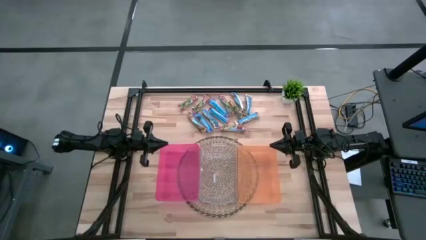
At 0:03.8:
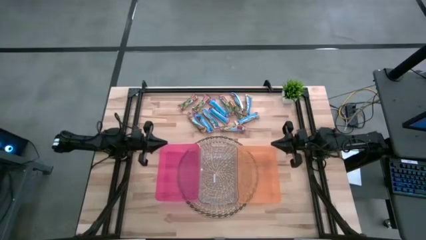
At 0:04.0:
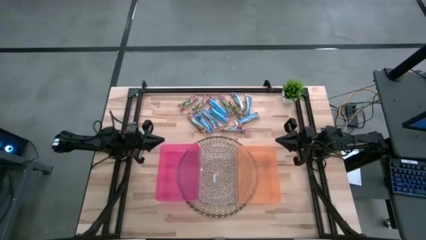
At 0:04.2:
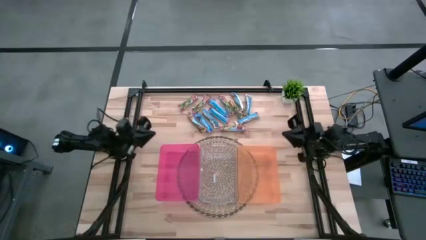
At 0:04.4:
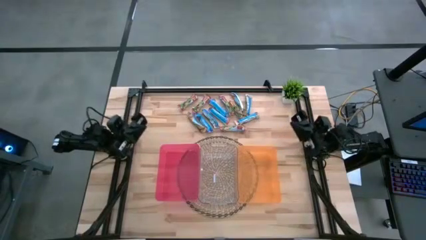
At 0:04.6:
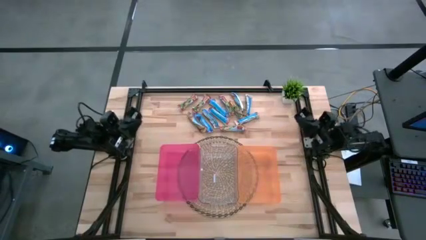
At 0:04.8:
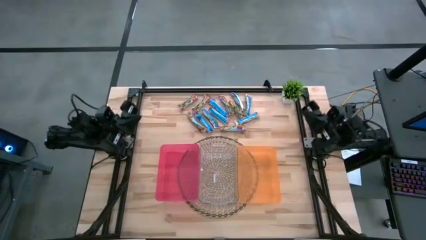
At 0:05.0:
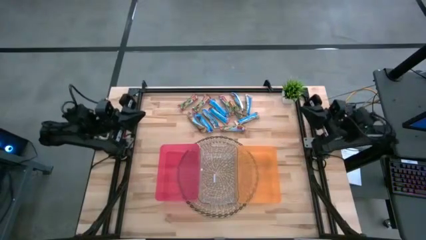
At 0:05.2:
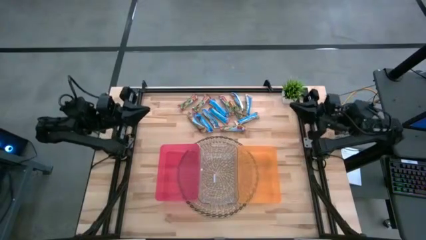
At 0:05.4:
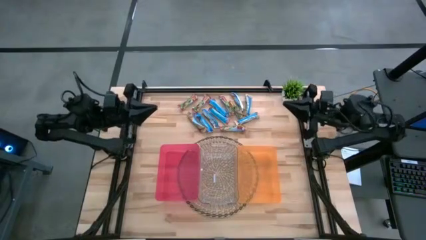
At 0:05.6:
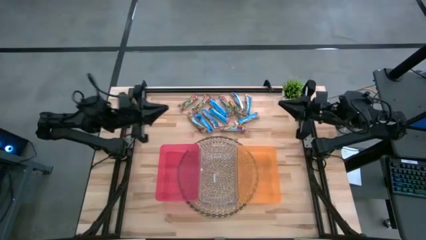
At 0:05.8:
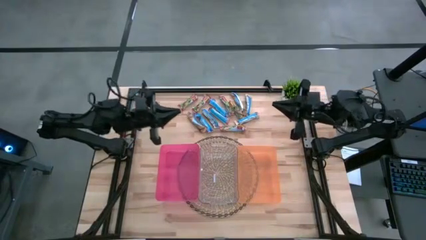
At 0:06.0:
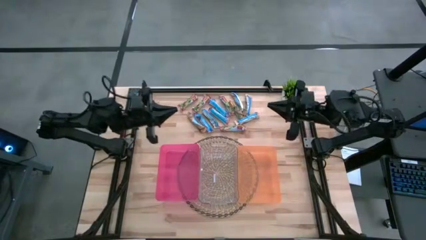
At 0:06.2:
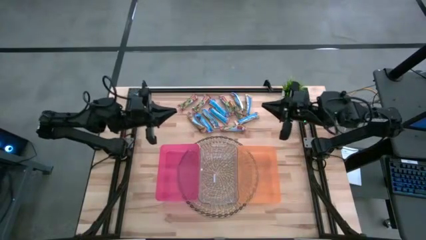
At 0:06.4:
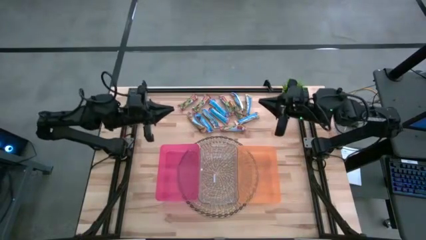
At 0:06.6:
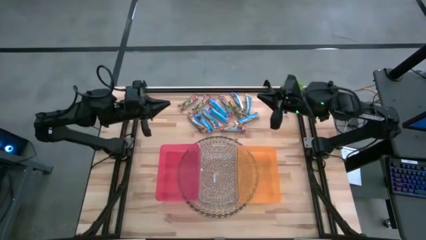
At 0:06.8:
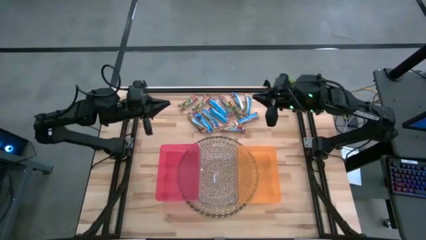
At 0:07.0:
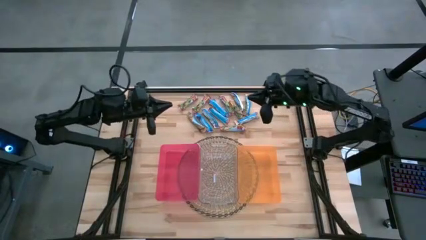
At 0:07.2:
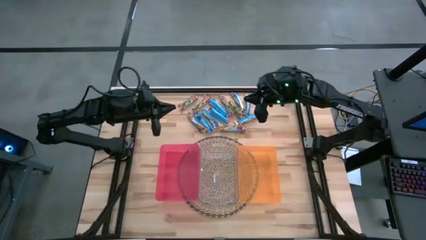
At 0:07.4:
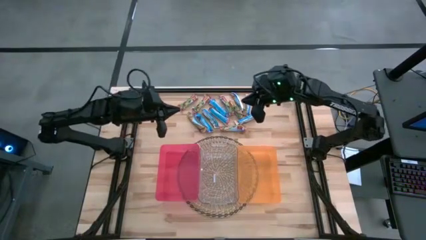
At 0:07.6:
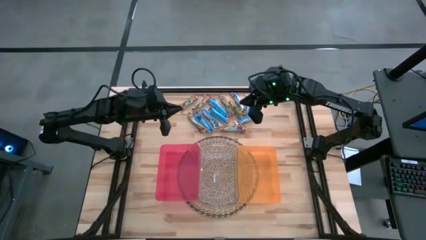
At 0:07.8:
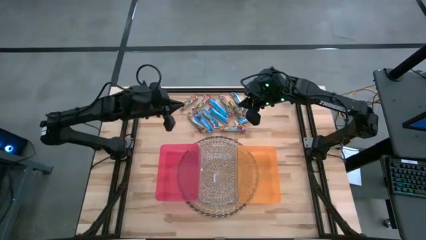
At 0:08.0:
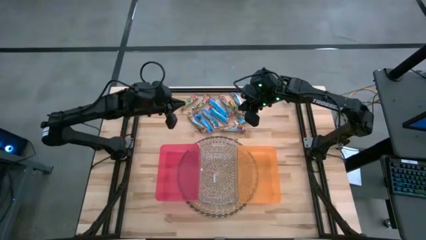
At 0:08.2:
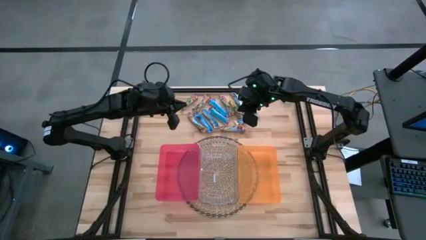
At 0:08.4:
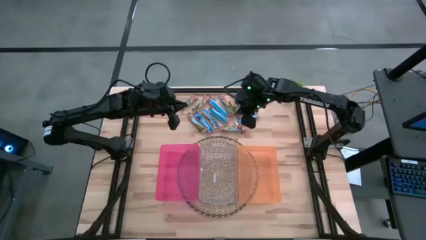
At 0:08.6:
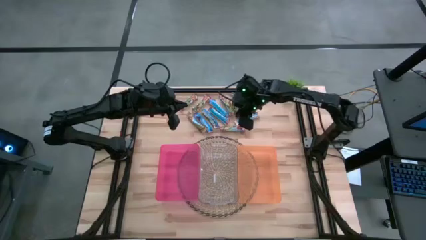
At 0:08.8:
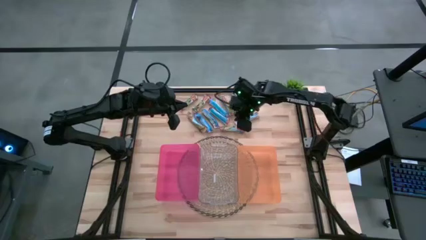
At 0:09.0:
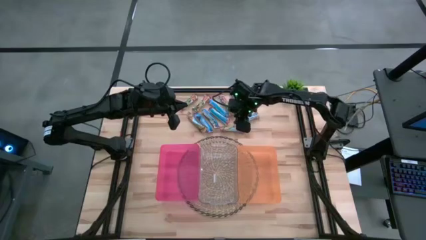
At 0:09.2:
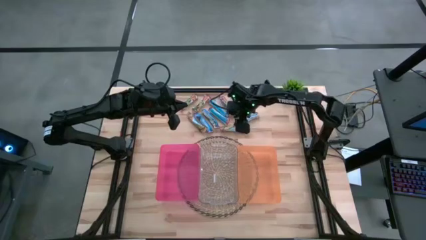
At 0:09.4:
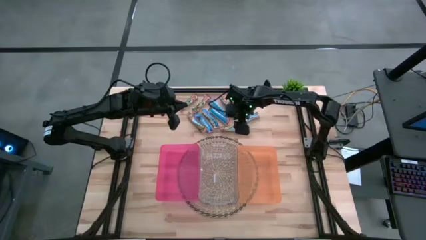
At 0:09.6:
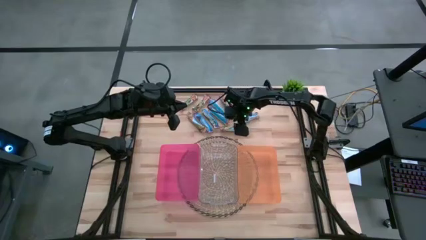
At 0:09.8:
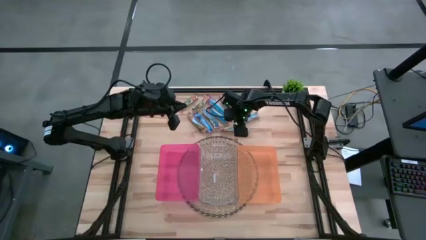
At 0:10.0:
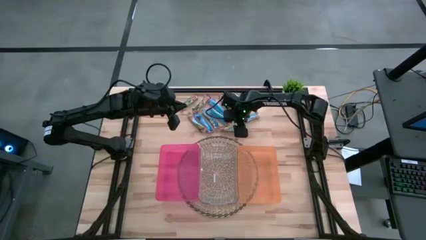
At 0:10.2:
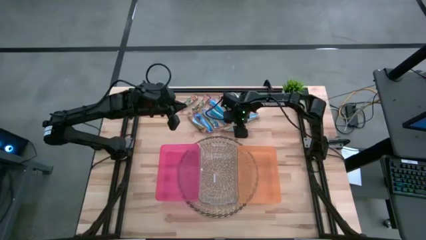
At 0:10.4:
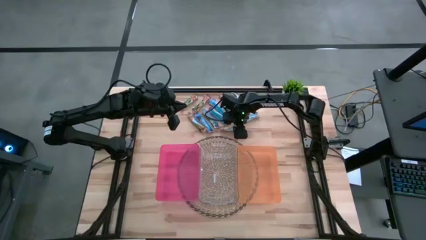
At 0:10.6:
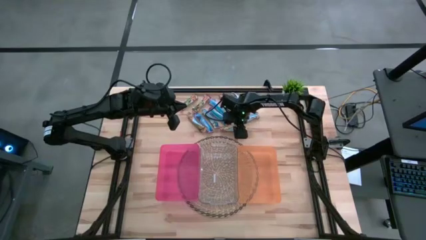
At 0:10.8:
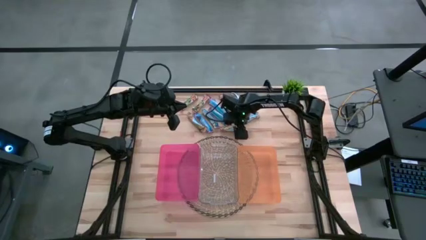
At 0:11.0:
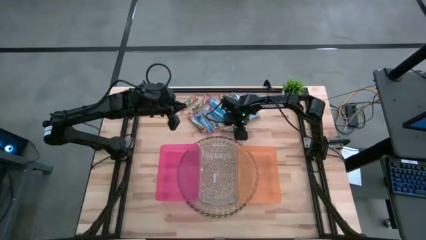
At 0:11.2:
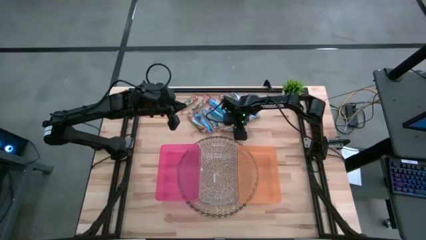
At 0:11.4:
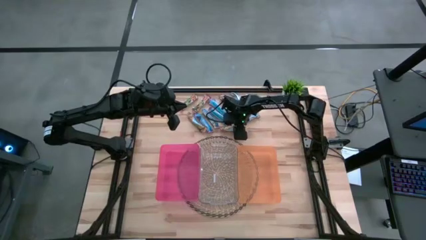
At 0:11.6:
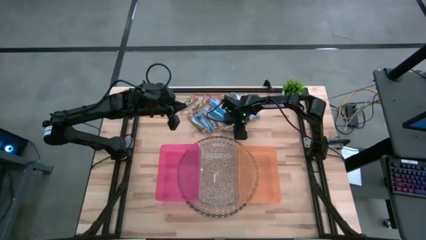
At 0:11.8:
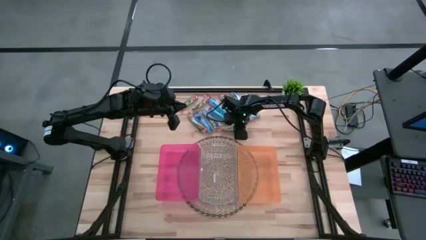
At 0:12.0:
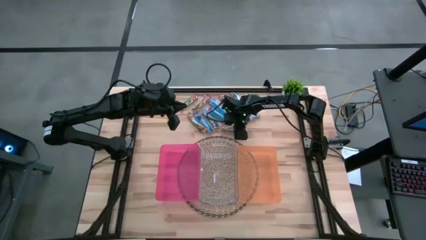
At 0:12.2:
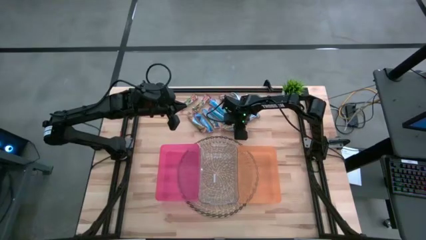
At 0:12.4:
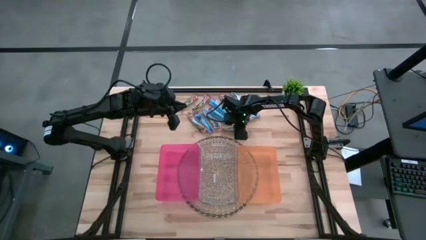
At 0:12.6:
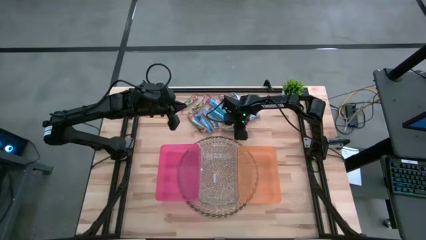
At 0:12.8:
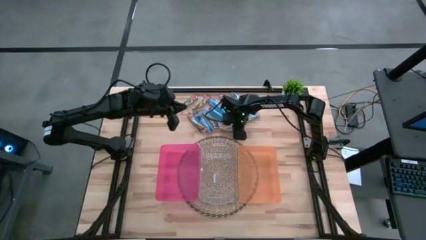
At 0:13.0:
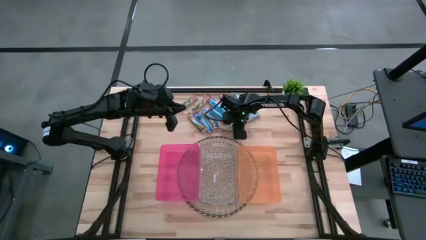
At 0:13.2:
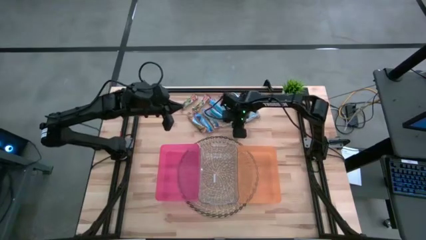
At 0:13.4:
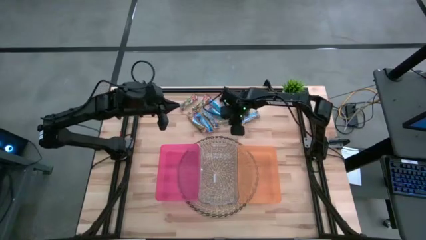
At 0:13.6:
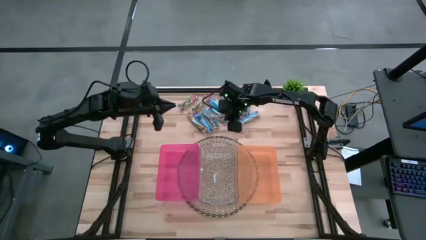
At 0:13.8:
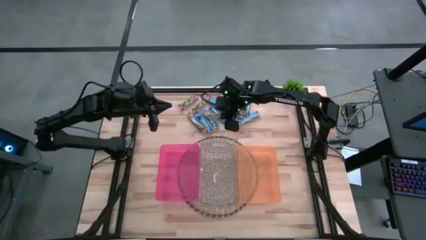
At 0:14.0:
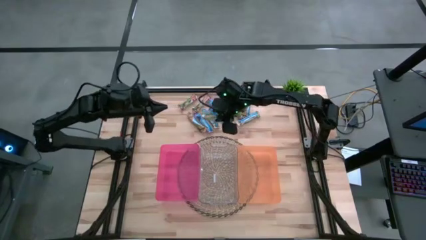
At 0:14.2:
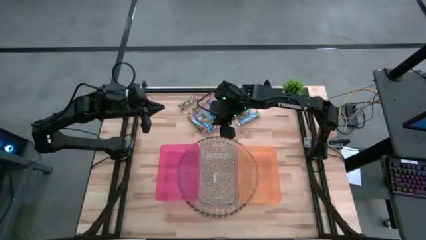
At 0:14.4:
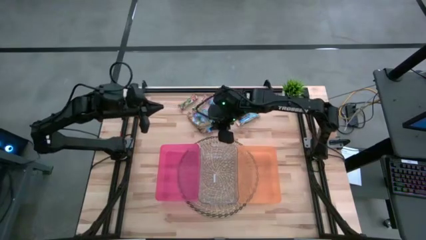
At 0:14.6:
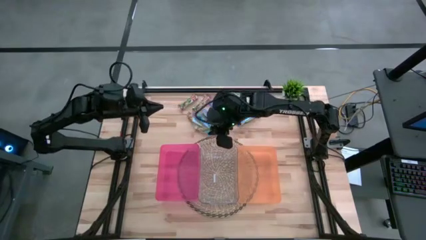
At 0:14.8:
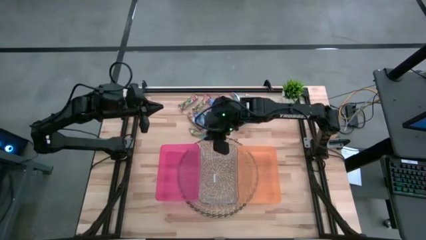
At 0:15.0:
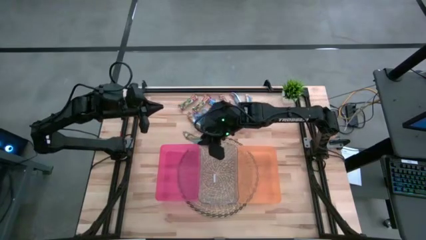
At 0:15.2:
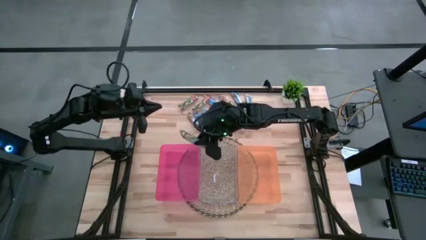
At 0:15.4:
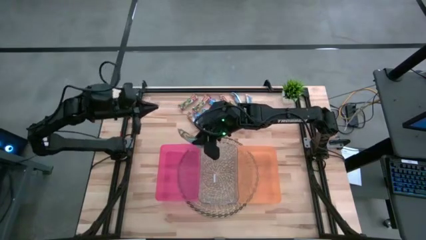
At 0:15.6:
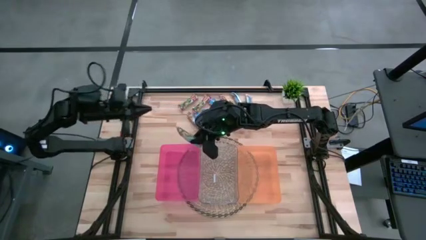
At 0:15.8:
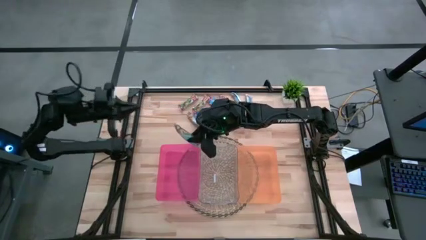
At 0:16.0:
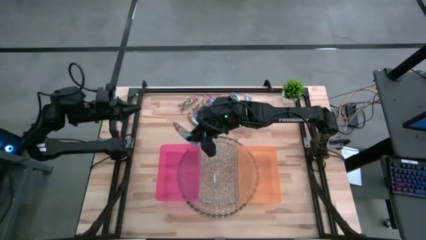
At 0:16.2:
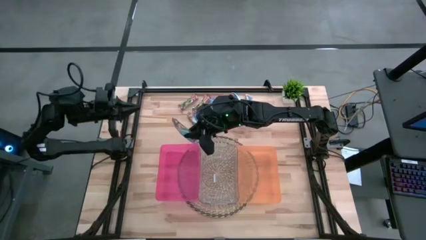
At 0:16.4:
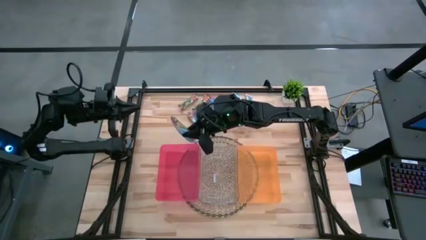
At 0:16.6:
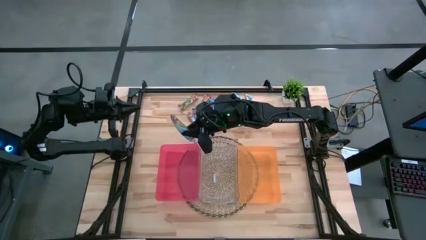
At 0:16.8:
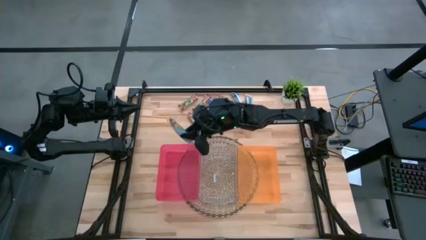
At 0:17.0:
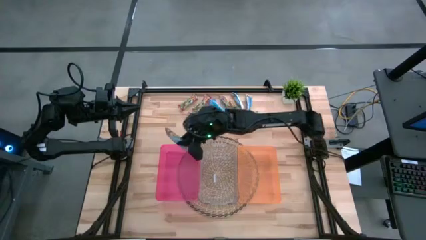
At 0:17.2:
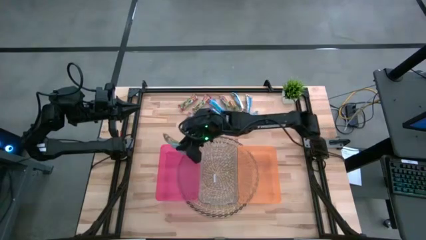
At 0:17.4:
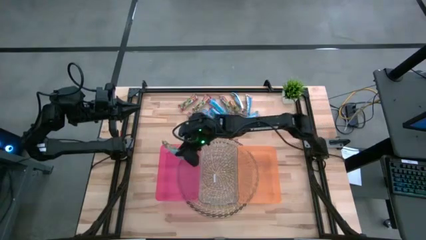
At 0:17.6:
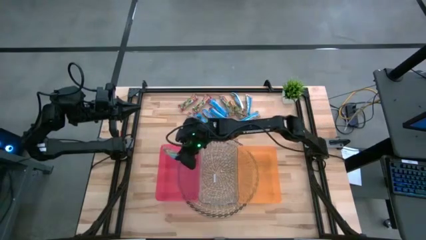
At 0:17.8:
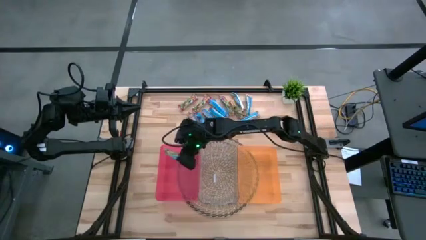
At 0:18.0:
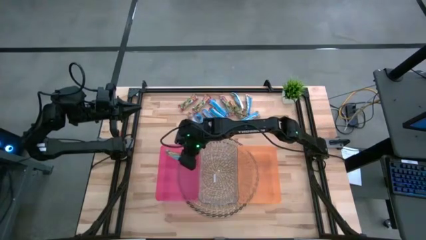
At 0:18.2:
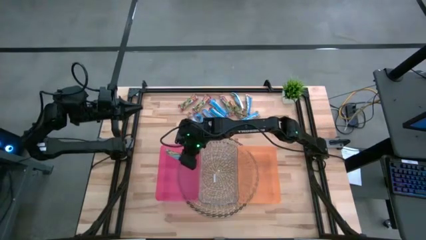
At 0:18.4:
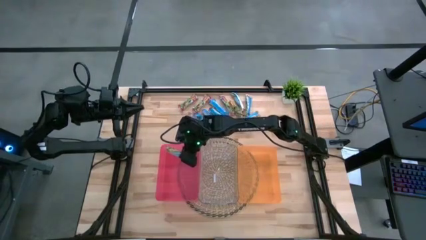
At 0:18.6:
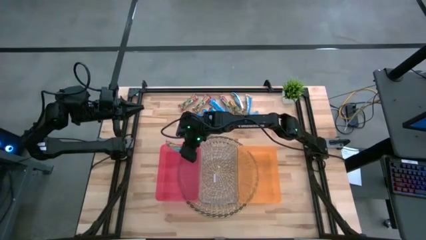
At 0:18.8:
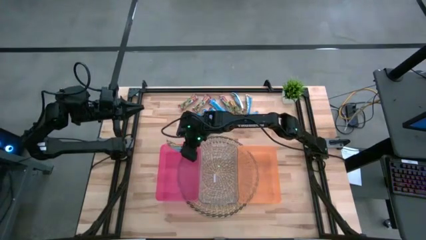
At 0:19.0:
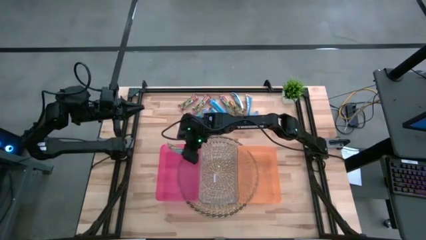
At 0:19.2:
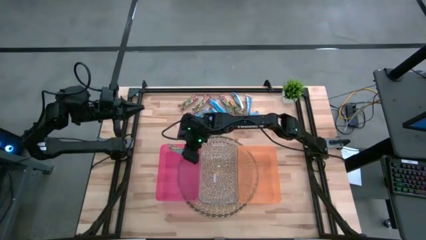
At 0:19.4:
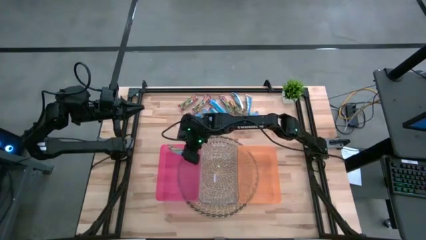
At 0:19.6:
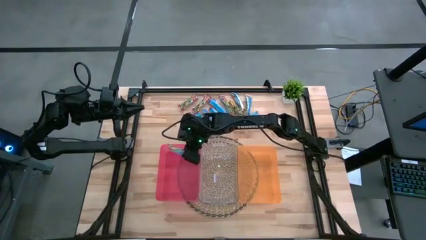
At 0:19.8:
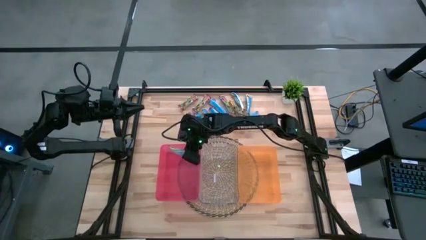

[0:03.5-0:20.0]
Task: Pick and place Granola Bars by type
Put the red granola bar into the pink bin
